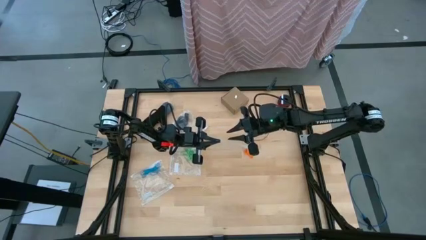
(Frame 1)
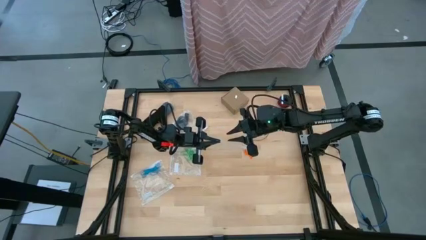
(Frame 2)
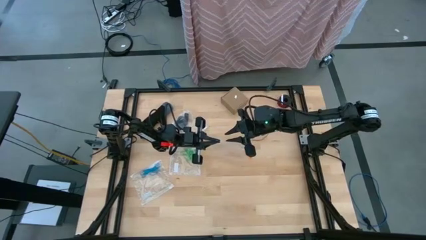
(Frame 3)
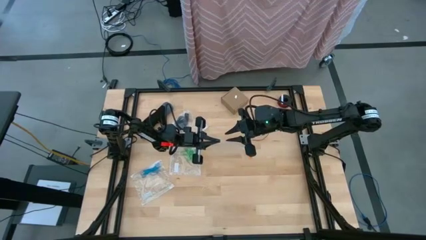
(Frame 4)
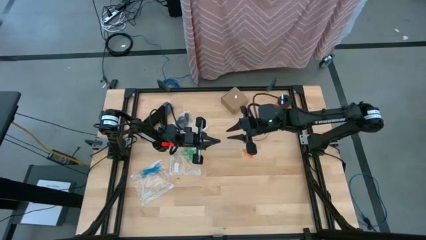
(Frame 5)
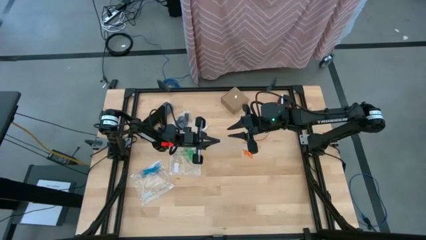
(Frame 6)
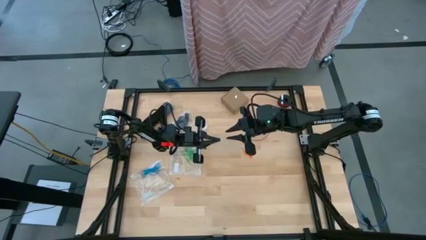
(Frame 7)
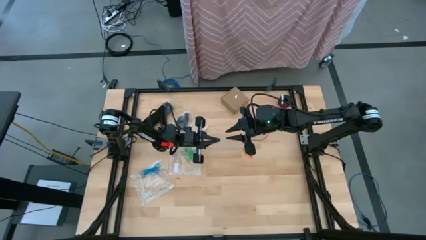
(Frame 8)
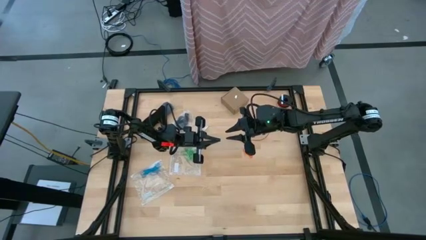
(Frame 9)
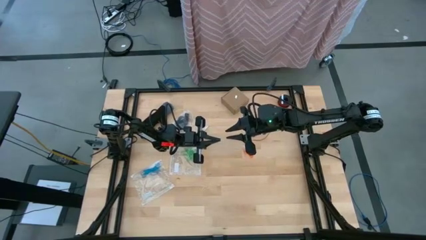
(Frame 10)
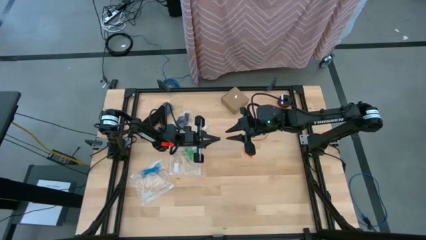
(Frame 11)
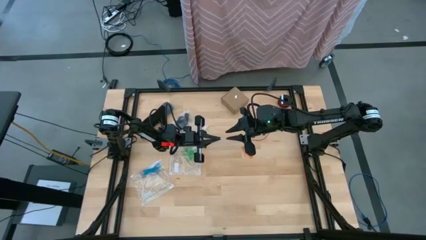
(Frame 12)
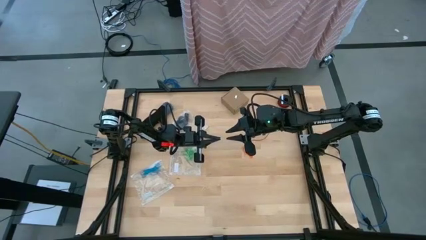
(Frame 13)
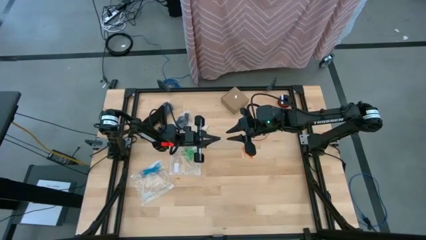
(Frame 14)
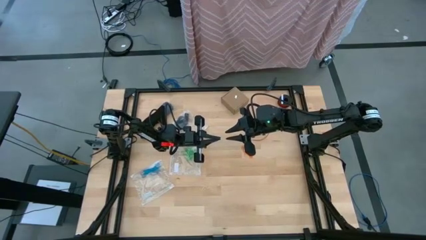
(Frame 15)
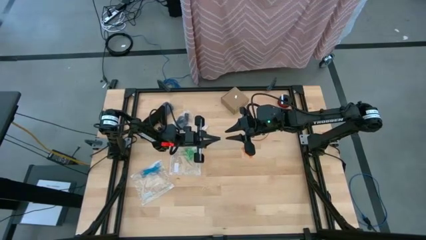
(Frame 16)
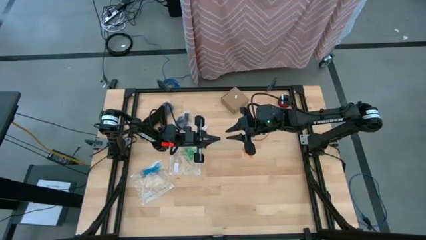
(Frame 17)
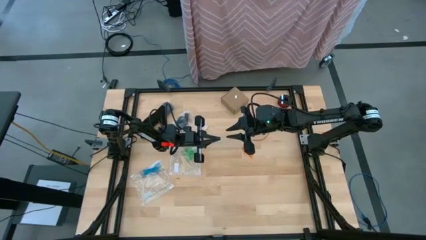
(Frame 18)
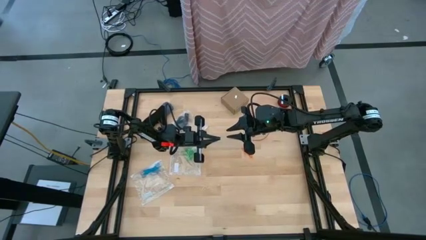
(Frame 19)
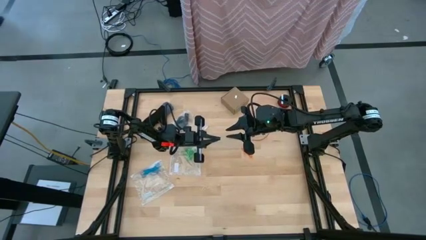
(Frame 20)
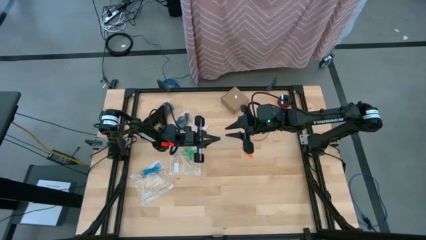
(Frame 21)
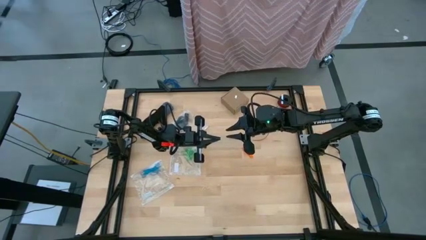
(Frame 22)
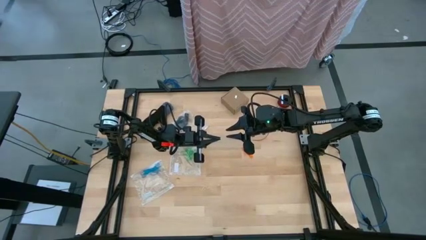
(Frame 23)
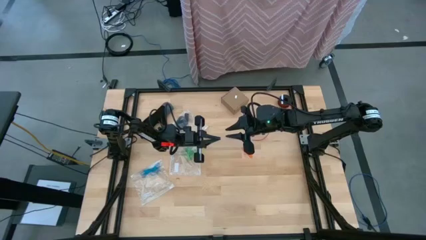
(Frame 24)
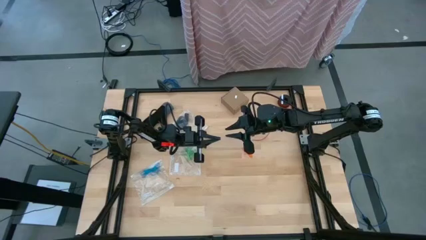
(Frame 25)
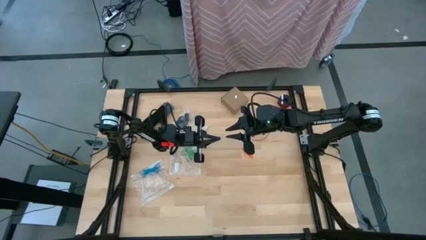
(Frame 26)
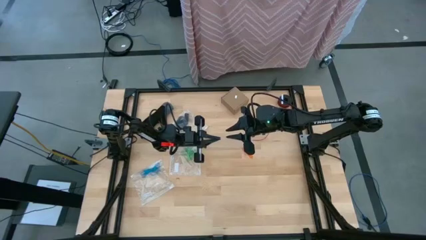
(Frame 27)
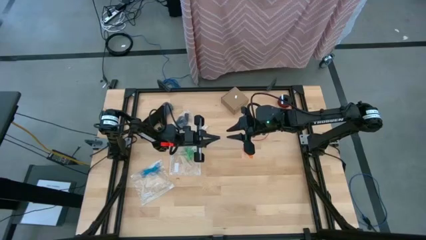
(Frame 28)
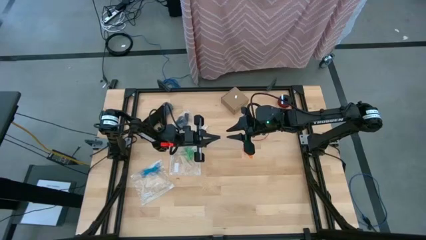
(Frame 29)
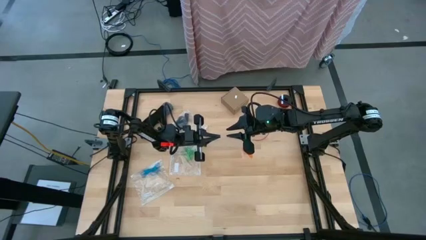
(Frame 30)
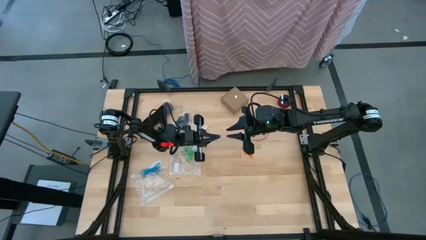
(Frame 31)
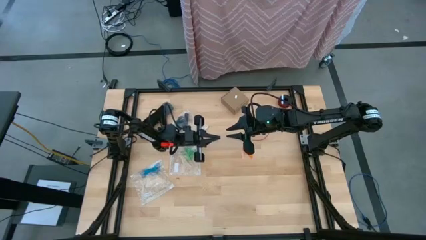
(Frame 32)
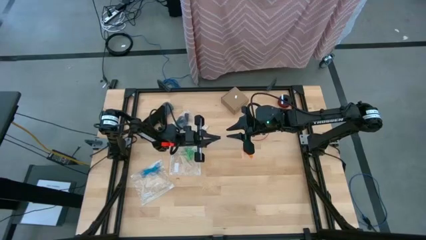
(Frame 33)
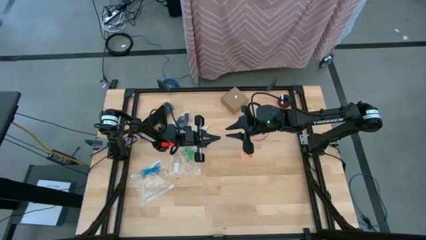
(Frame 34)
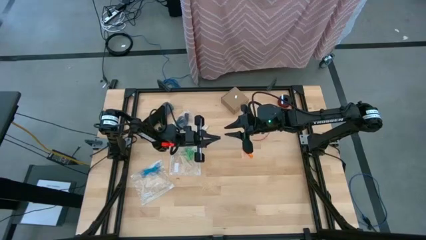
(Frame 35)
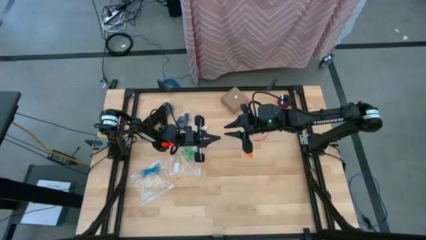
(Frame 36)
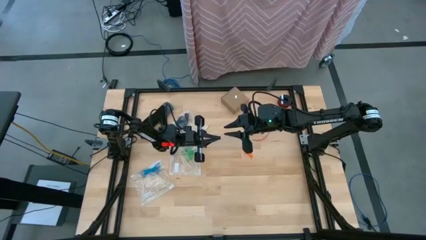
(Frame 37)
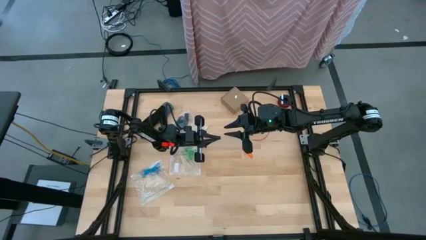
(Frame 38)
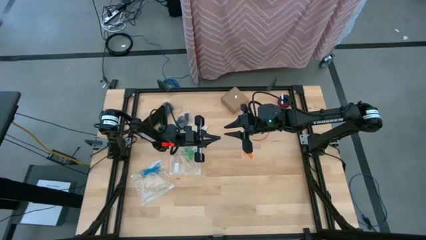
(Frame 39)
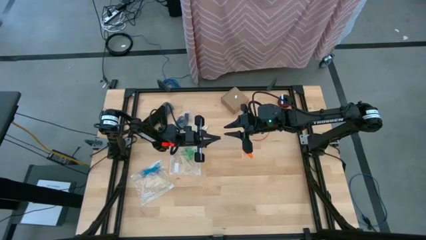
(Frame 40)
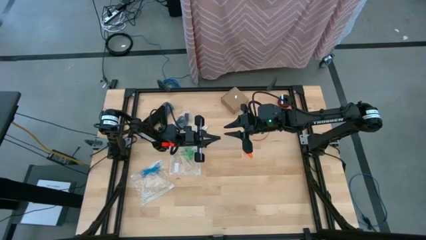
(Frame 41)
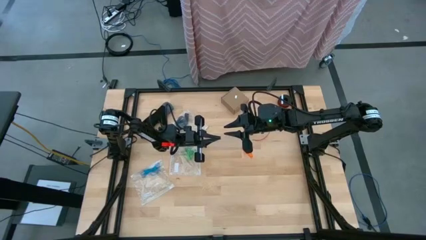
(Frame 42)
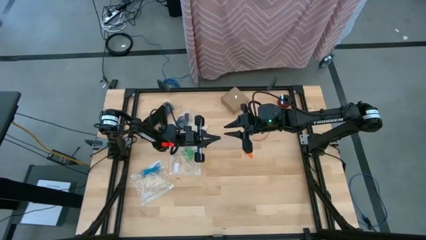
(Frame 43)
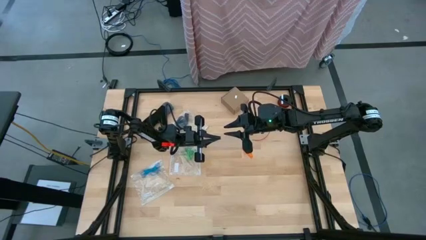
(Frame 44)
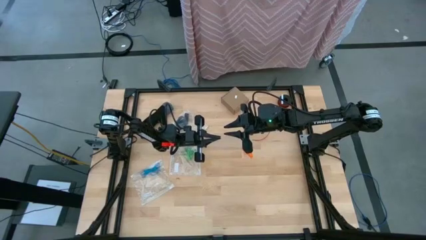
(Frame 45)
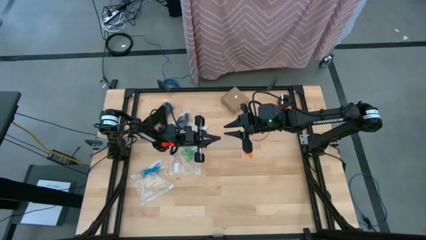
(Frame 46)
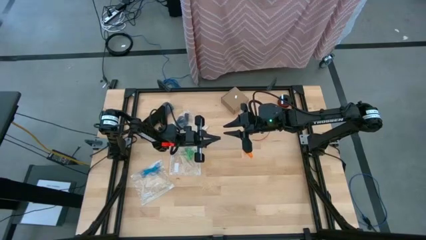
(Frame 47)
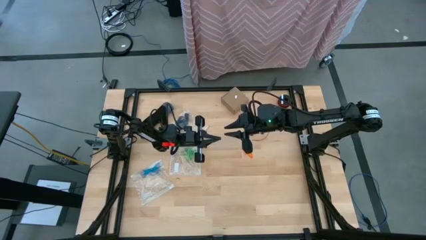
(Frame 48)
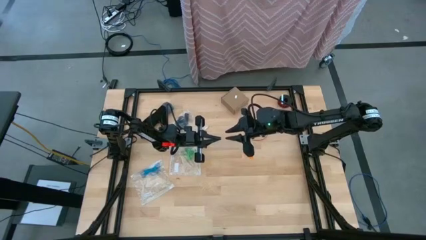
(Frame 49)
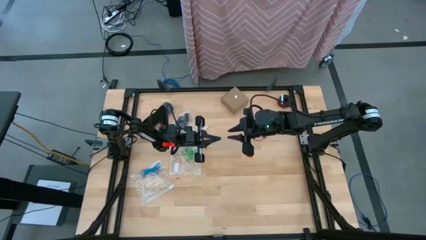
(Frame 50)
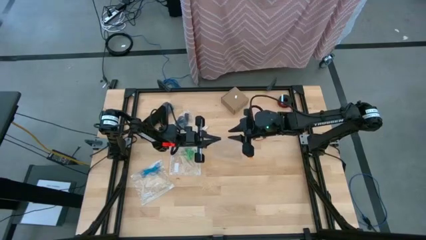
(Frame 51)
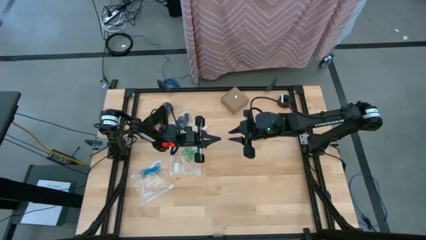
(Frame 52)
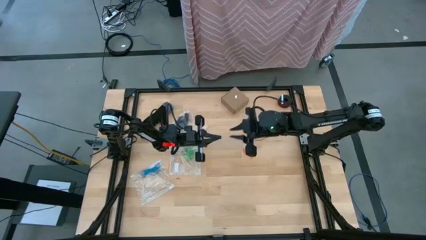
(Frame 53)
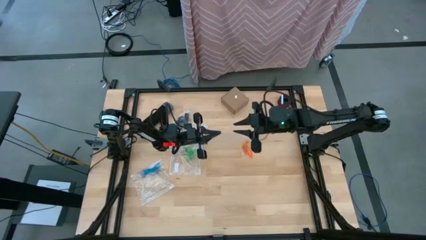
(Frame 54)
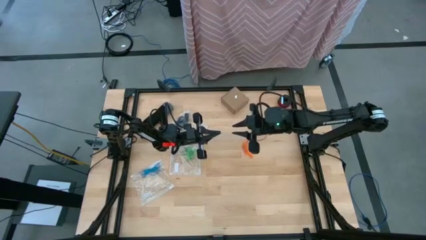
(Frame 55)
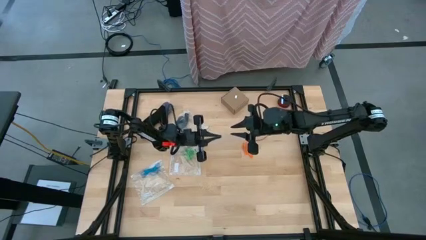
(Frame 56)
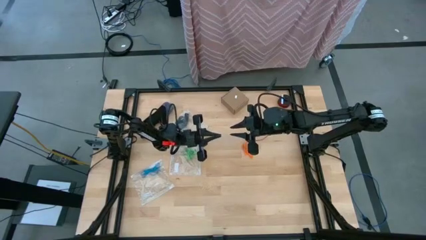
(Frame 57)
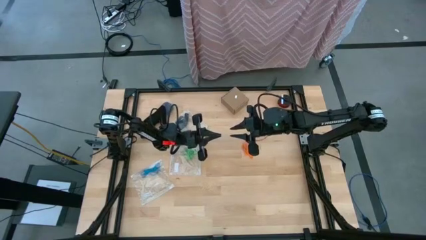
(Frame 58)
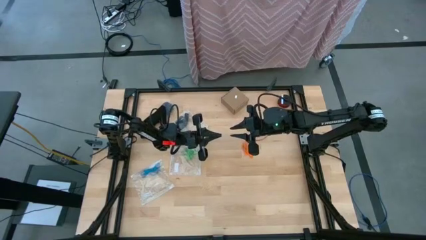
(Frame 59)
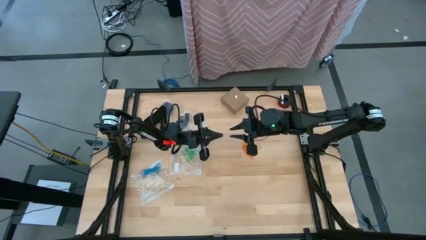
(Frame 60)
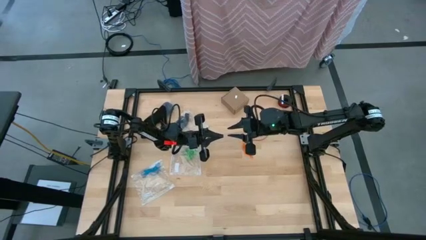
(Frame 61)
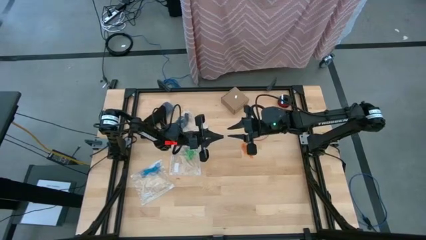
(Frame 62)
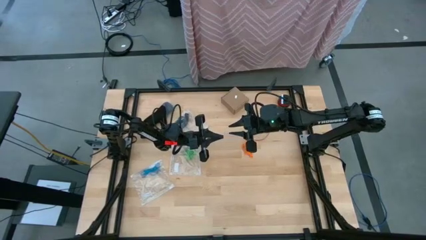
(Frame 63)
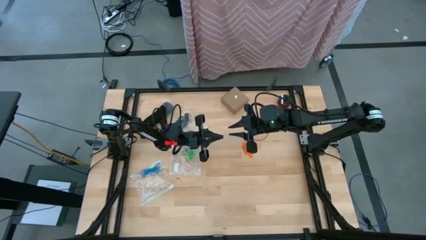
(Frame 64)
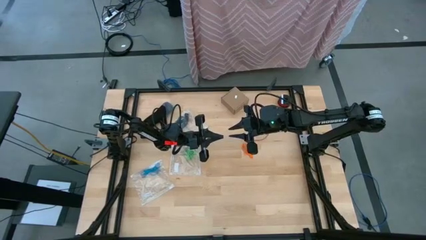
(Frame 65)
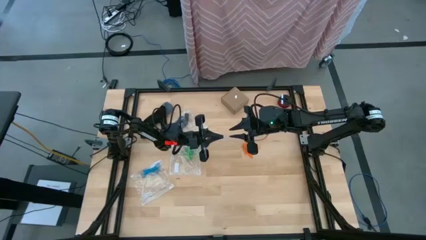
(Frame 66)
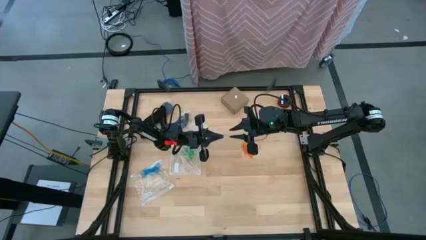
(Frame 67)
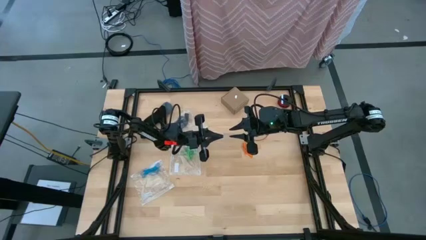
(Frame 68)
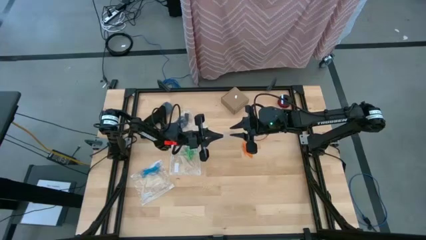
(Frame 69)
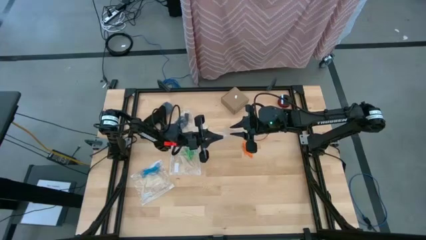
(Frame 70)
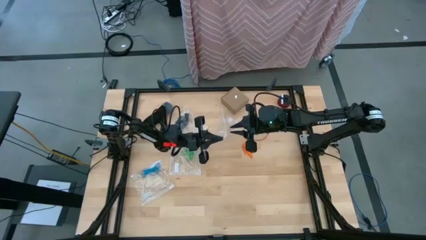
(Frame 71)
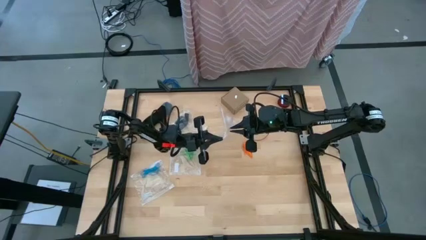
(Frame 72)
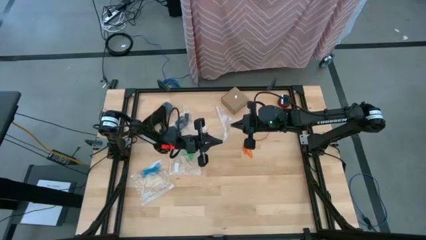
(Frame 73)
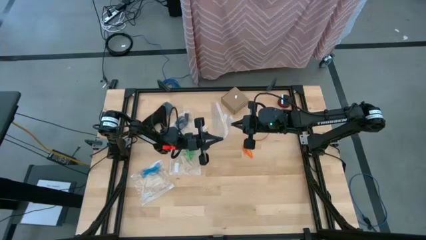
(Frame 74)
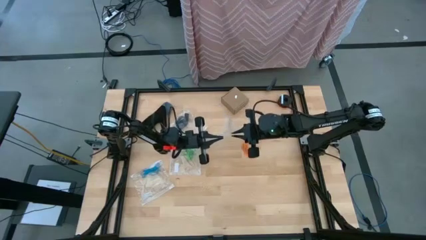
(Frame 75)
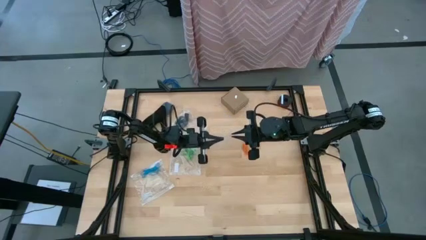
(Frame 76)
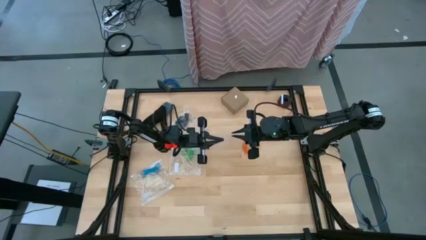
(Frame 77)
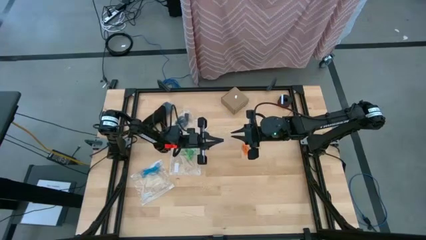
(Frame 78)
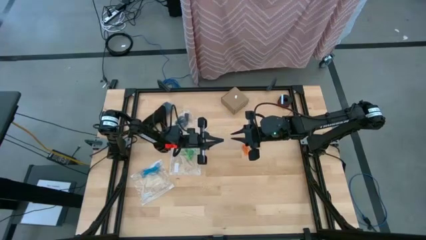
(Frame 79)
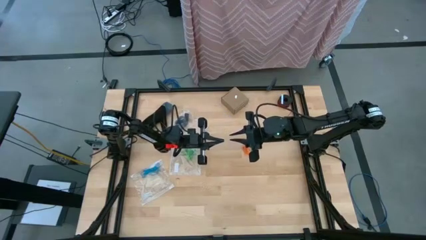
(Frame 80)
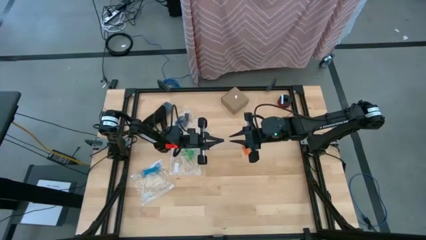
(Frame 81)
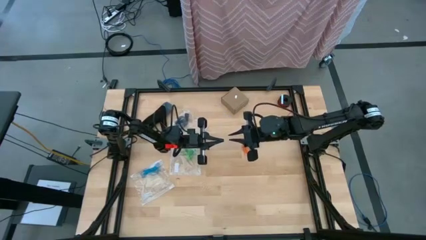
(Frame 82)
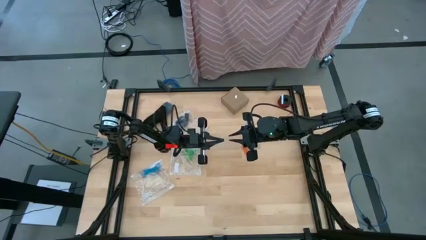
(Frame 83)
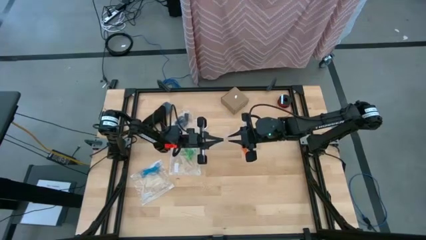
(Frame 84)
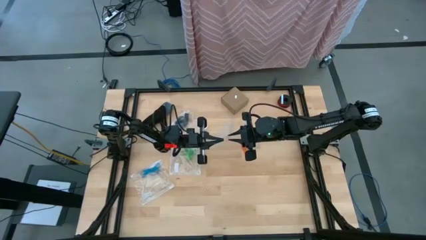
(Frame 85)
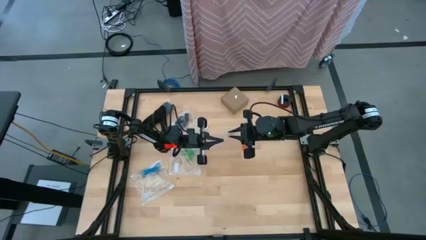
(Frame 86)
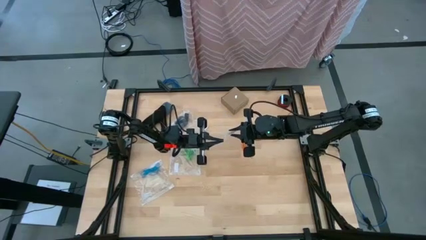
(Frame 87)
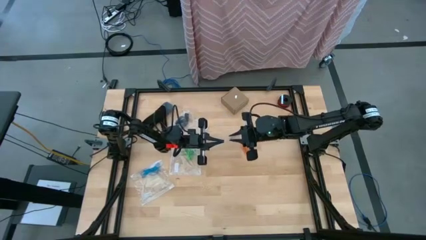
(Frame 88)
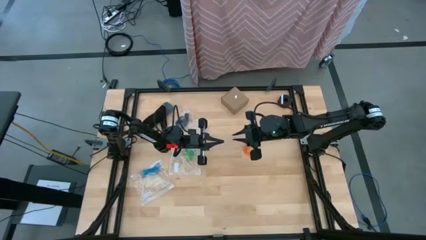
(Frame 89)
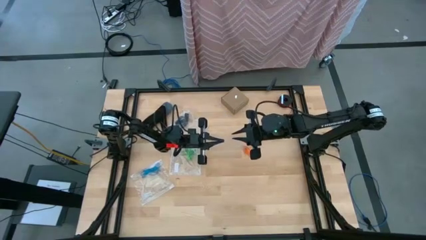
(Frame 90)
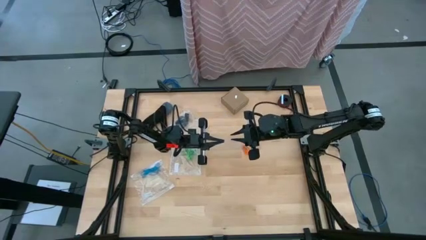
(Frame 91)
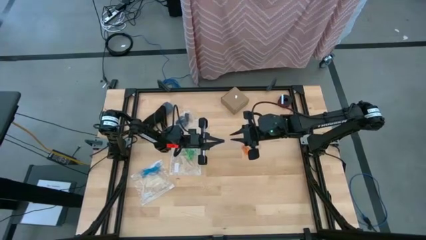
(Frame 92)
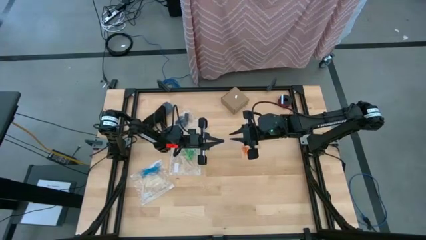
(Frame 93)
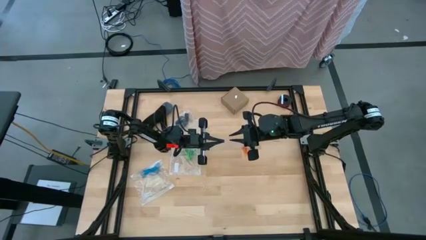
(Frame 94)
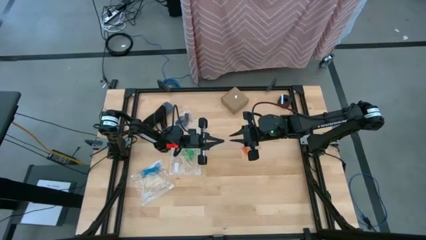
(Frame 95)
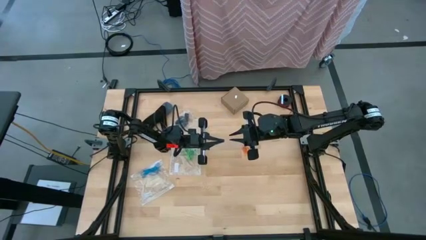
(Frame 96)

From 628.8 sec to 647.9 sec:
Task: Sort rubber bands
Open the transparent zip bag
